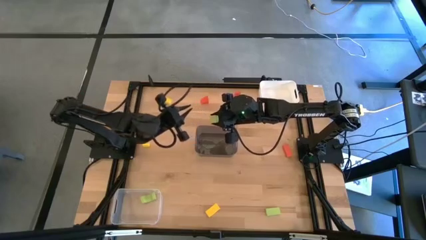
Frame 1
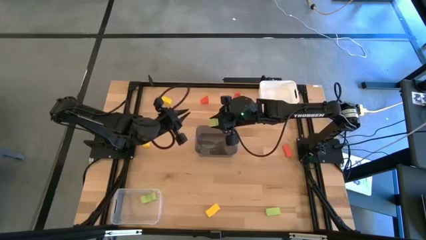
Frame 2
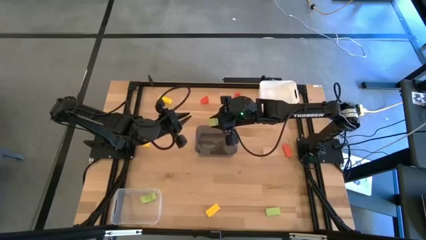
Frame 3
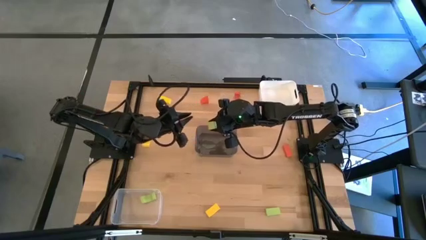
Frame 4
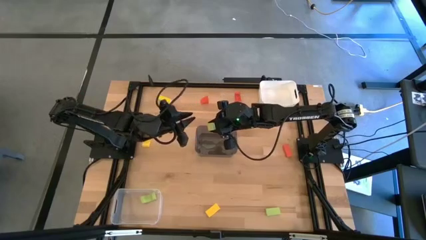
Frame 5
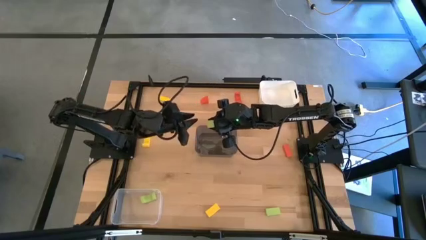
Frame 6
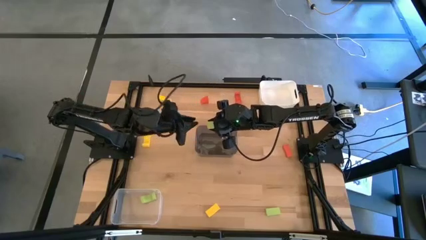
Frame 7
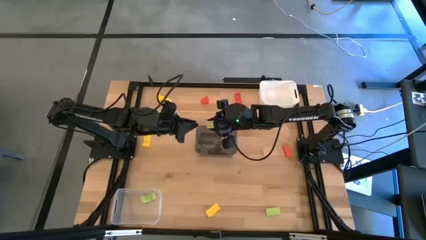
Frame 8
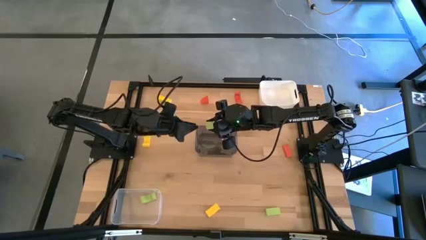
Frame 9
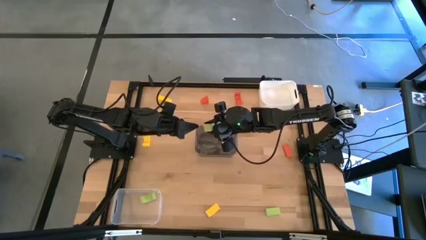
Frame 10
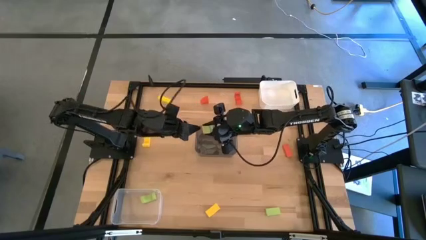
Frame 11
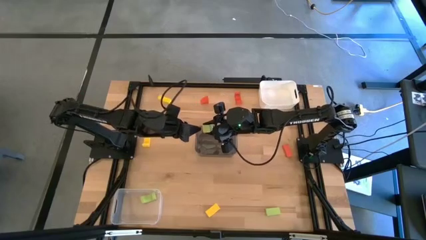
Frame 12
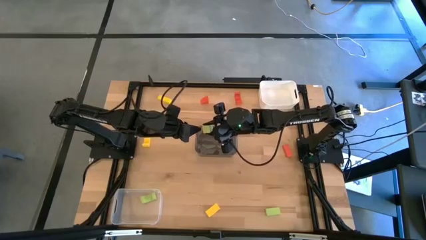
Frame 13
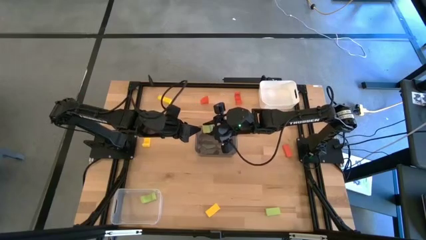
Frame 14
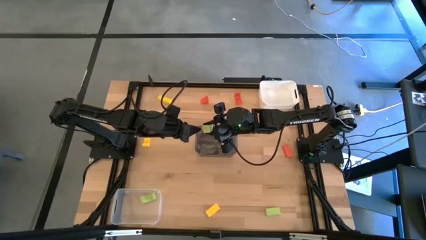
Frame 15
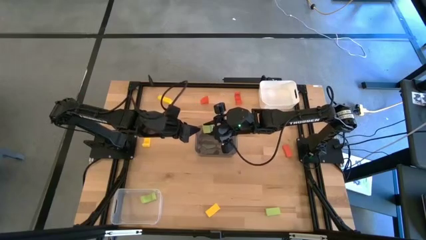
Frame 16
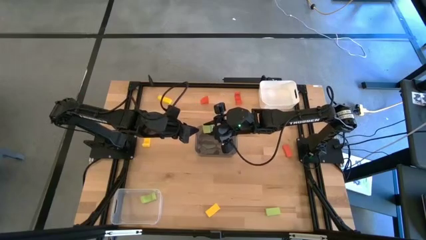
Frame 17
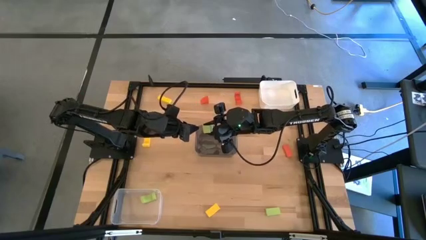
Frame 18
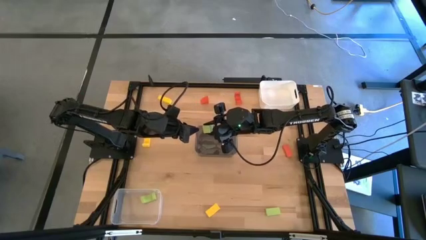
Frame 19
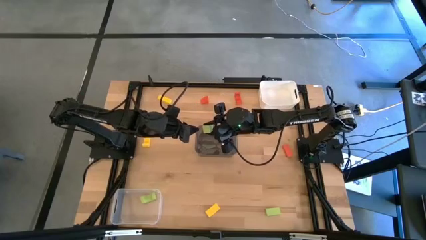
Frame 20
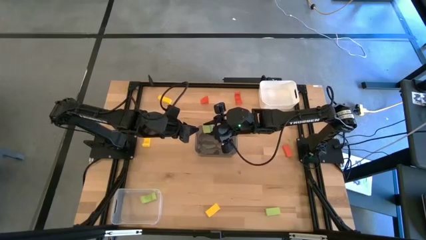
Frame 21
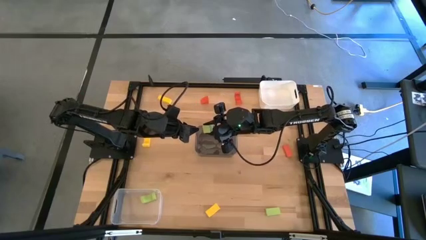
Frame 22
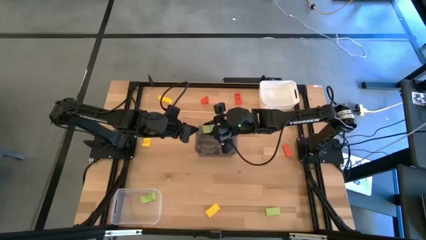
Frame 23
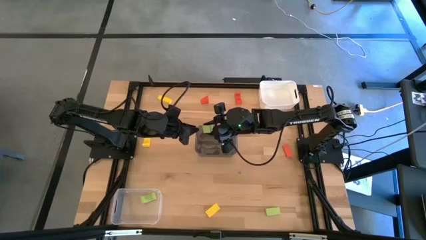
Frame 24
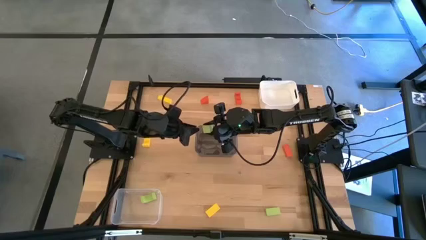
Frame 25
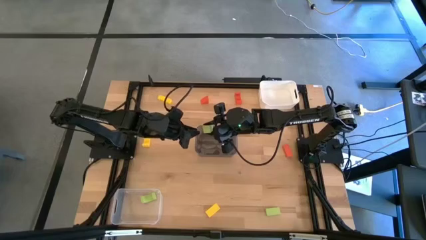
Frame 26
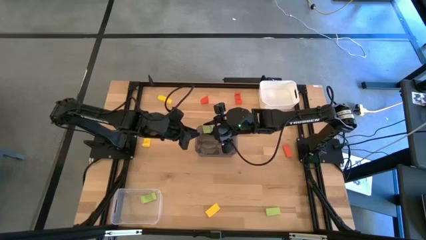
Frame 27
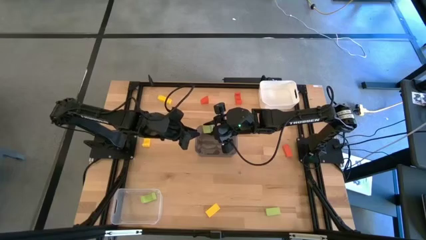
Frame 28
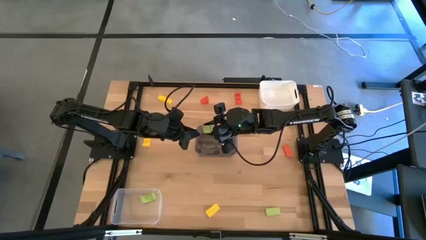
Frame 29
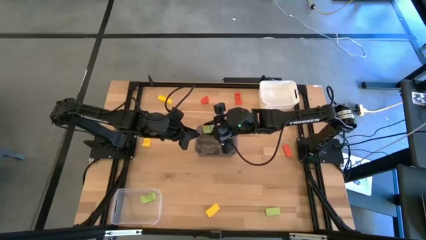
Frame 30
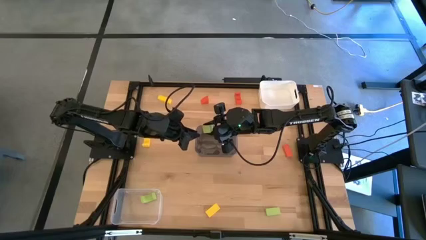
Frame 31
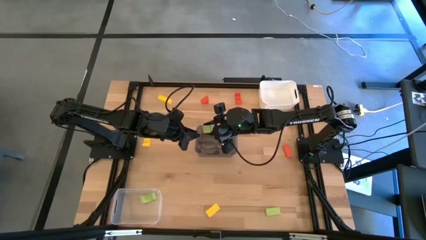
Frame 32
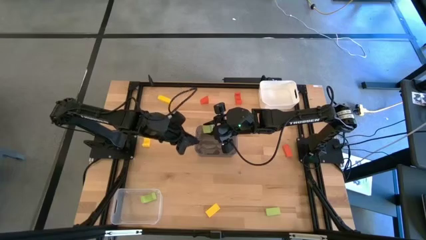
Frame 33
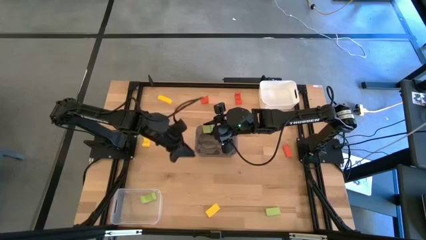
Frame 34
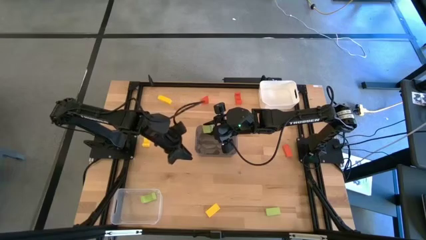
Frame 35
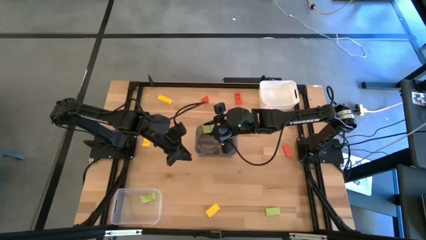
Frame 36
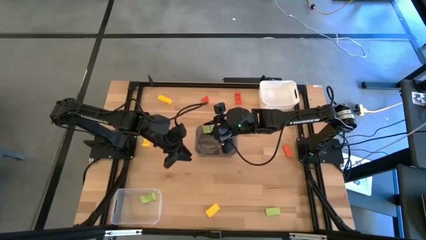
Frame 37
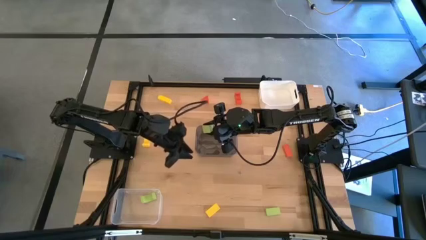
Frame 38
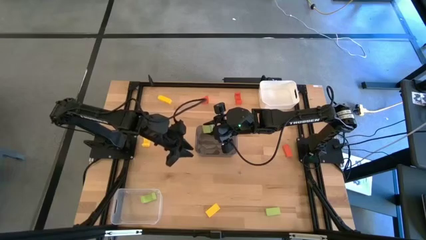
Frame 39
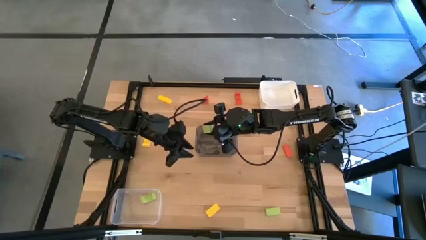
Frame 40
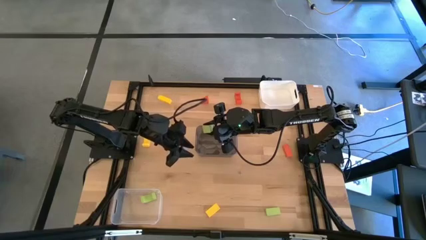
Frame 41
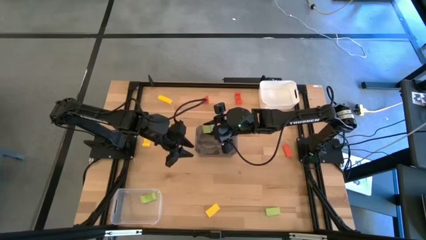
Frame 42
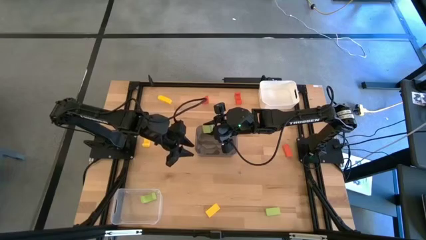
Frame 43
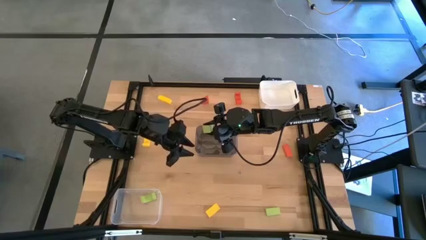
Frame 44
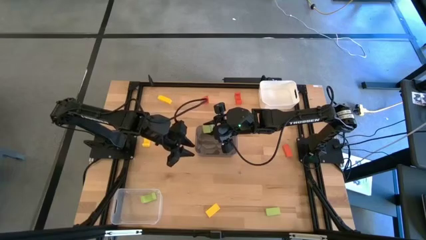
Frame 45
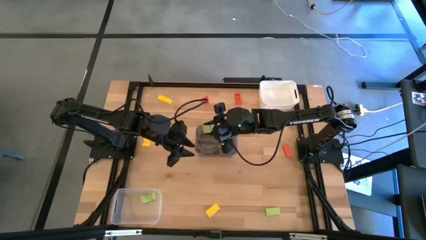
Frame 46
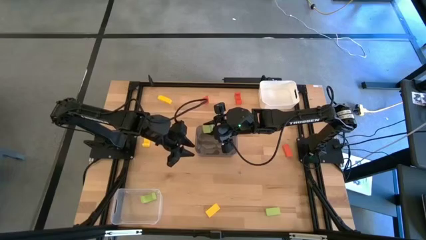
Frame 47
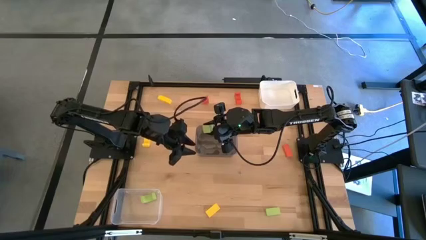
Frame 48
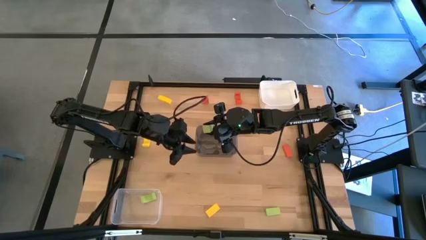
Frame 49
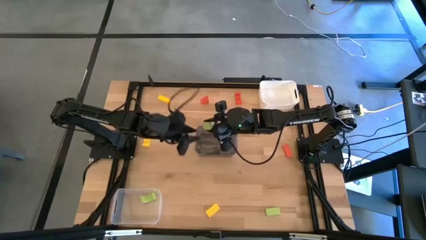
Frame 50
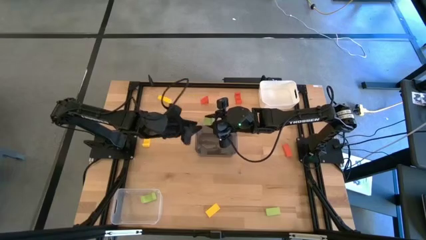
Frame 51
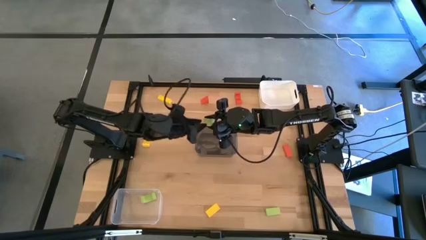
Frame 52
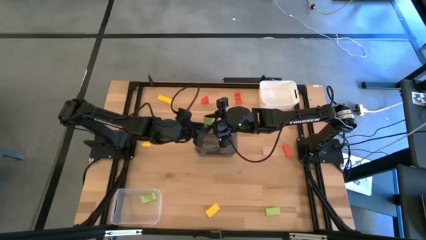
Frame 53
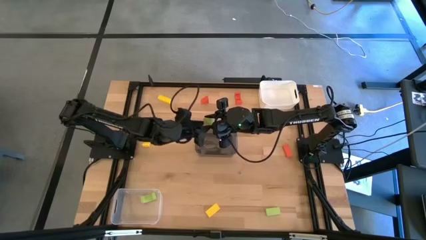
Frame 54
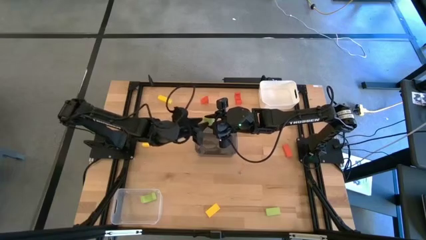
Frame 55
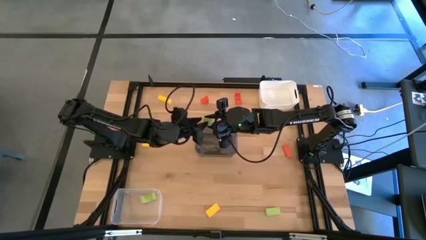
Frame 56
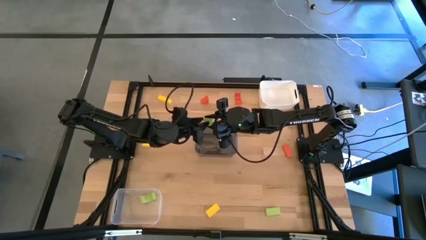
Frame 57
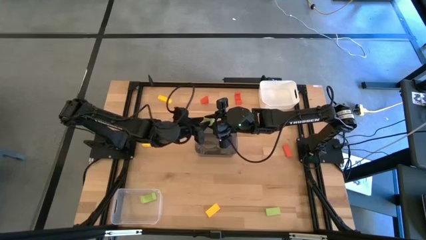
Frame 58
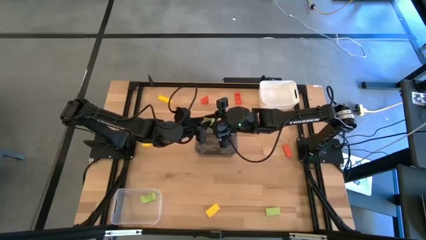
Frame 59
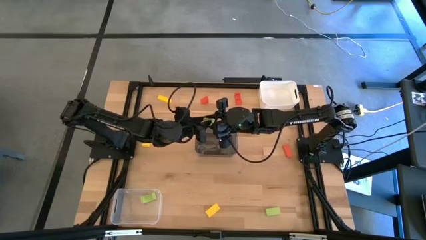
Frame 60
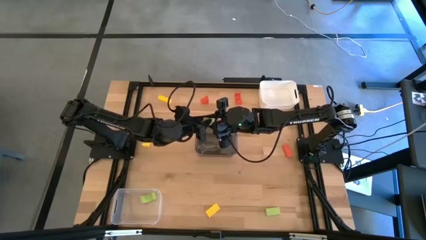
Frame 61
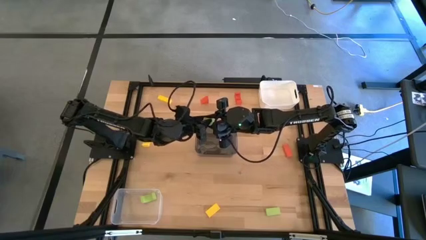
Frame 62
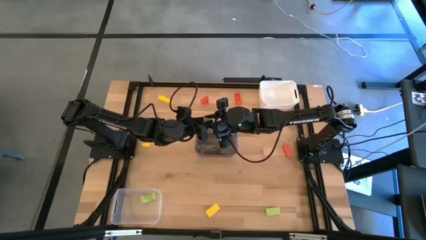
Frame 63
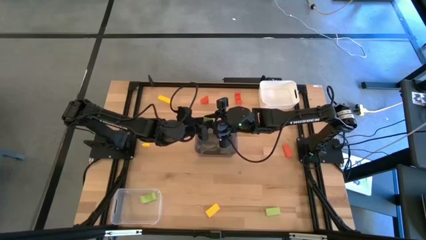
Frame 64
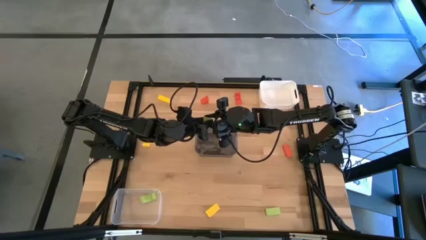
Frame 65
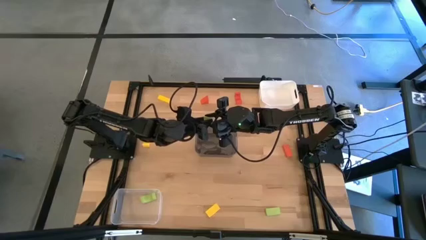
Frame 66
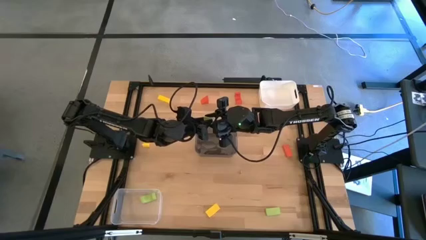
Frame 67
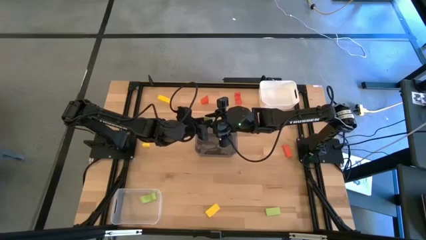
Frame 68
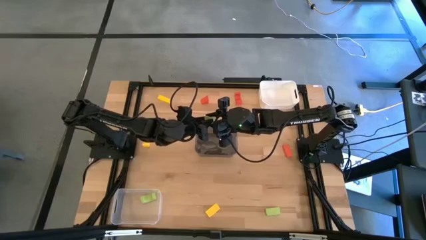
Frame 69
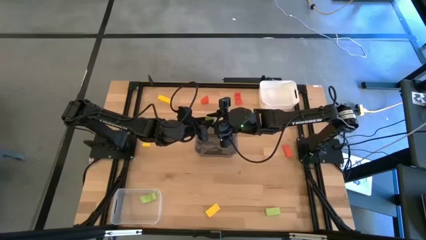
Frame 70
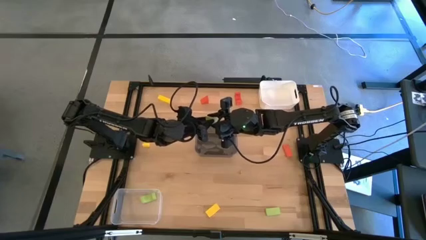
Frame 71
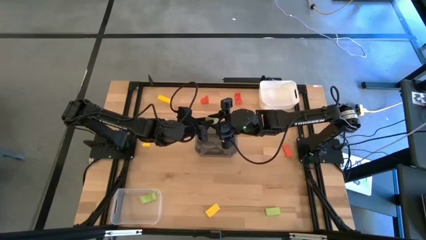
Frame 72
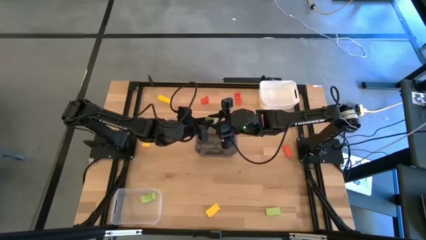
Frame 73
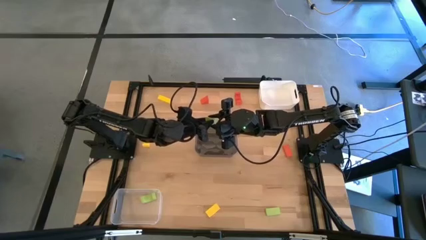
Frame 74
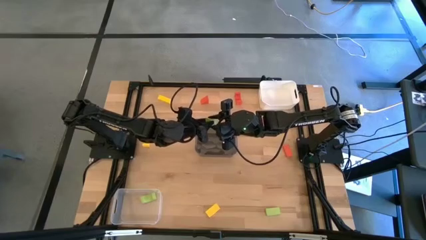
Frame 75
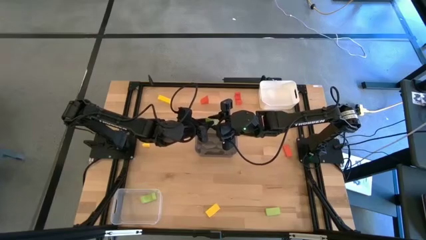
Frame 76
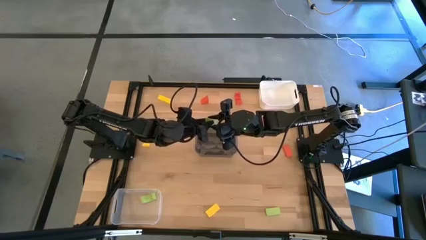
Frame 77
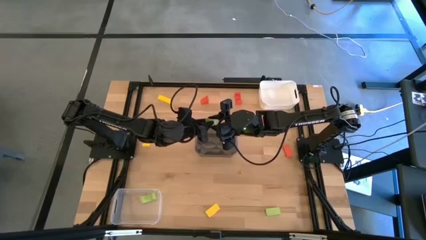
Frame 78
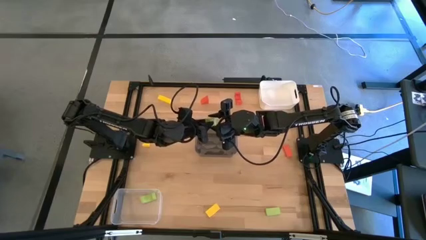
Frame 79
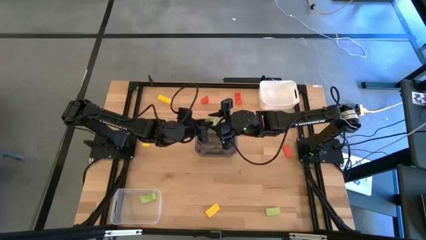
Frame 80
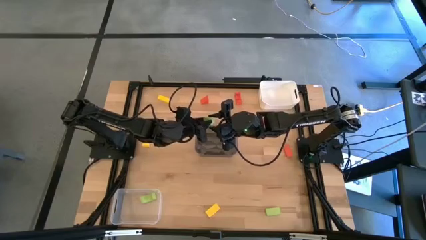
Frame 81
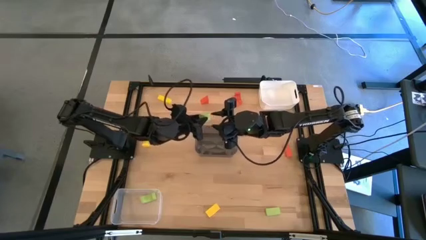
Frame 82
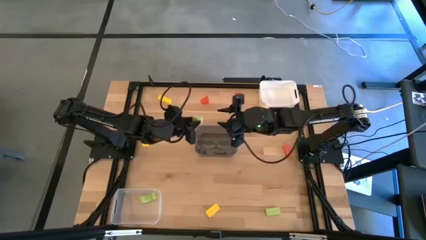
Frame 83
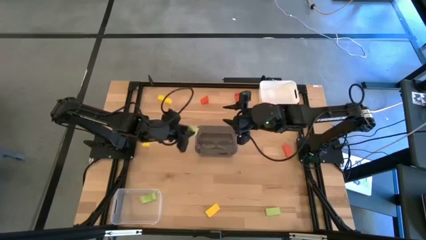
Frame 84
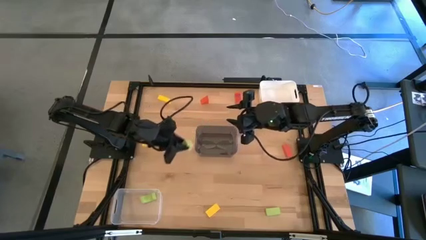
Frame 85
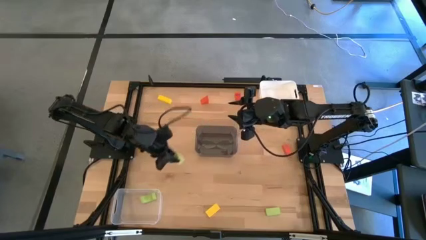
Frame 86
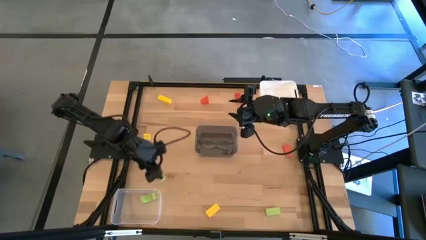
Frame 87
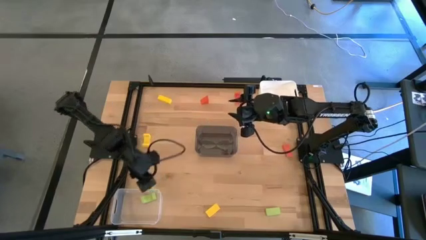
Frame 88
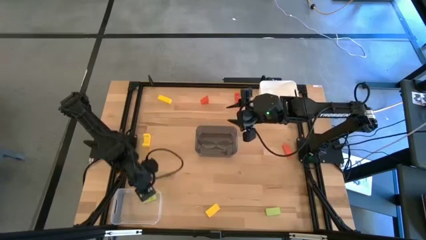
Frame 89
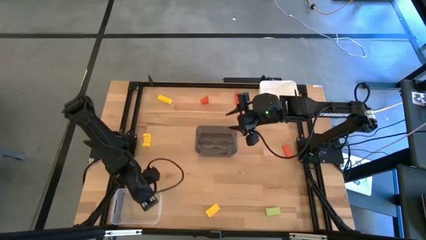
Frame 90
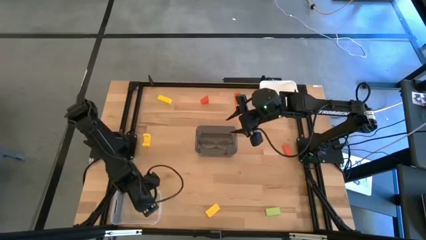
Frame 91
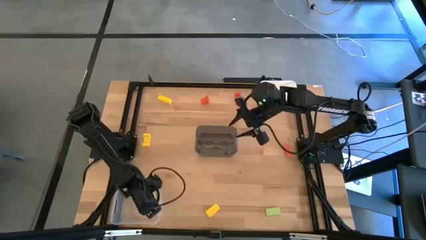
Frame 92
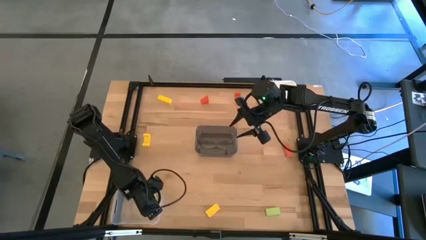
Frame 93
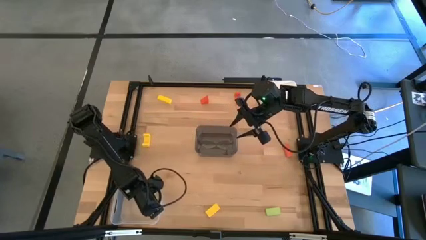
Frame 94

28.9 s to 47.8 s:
Task: Sort & place blocks by color
Put the top green block into the transparent bin
